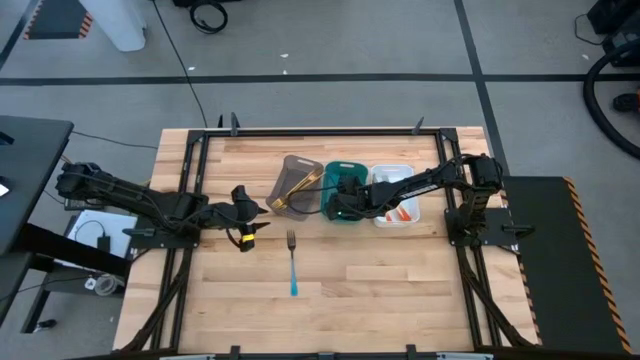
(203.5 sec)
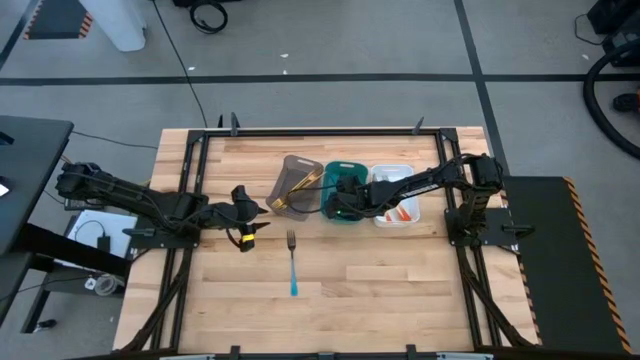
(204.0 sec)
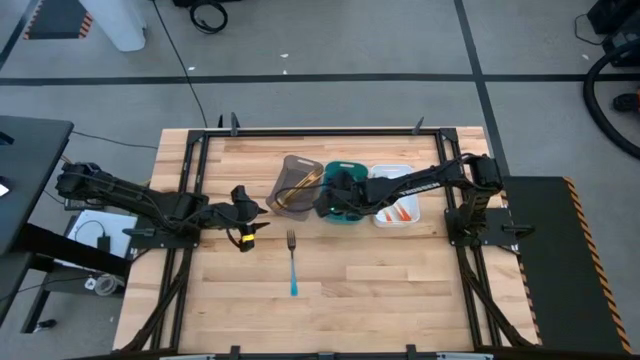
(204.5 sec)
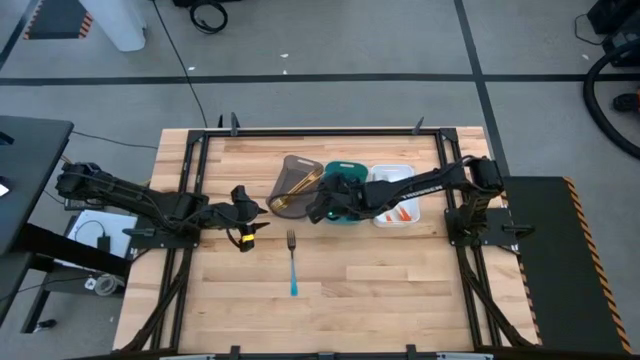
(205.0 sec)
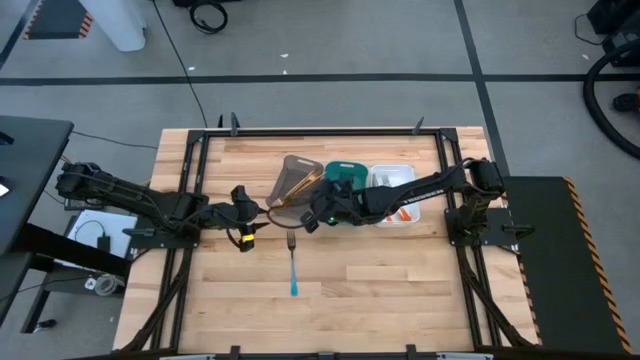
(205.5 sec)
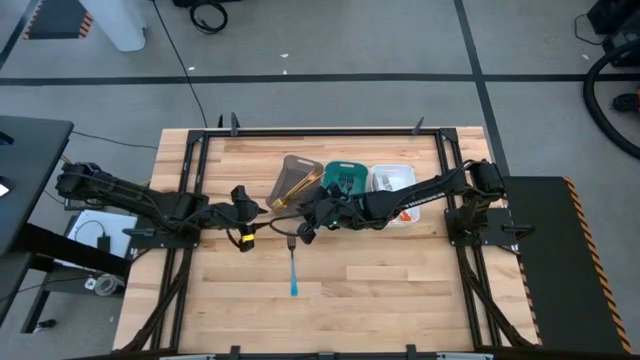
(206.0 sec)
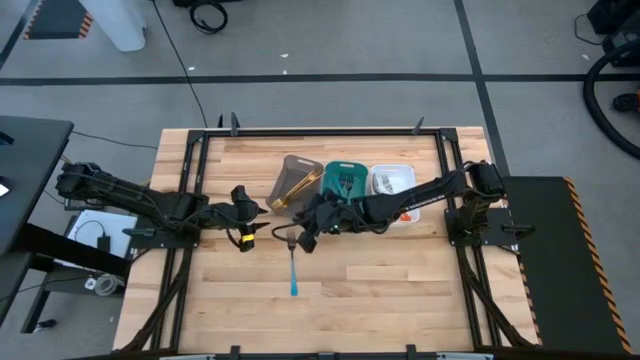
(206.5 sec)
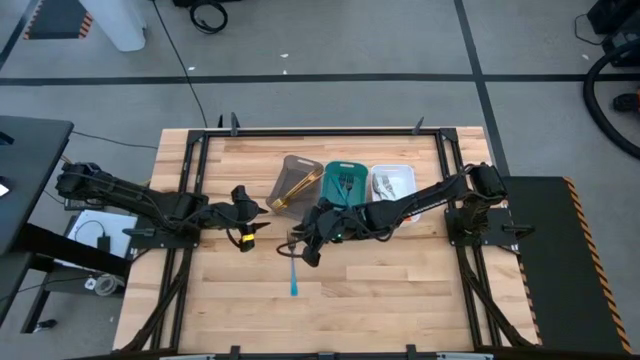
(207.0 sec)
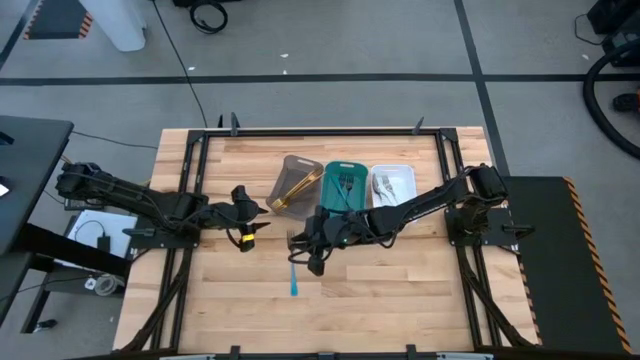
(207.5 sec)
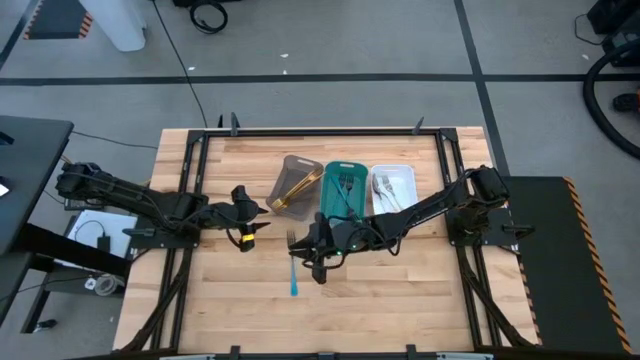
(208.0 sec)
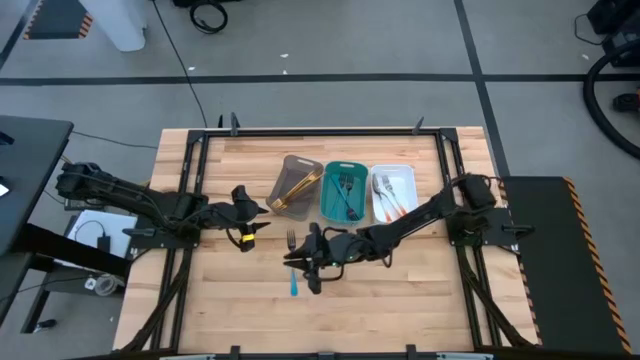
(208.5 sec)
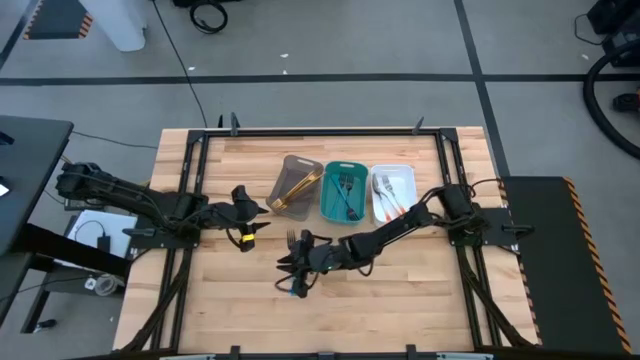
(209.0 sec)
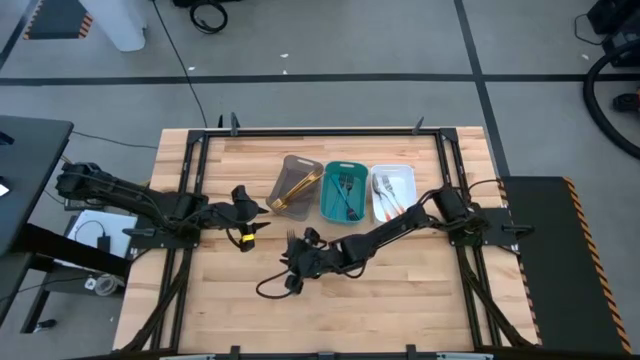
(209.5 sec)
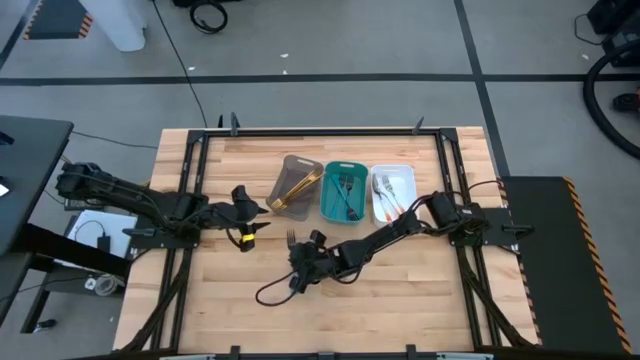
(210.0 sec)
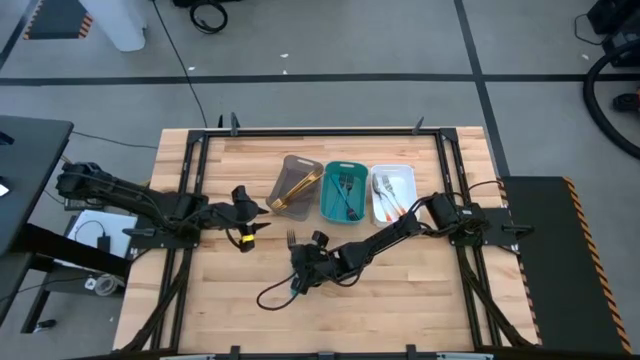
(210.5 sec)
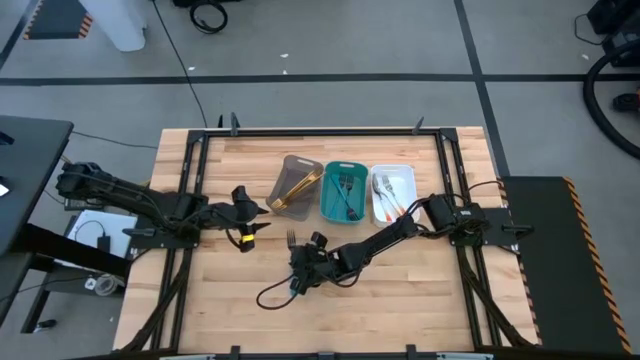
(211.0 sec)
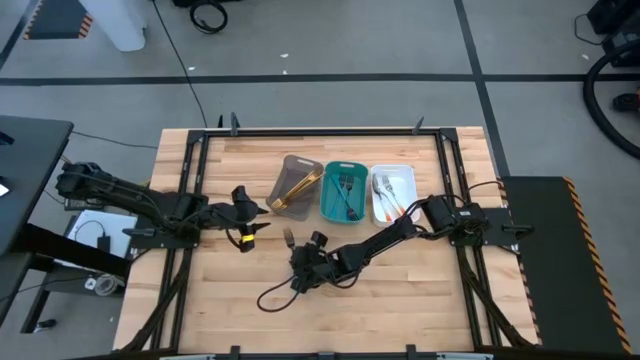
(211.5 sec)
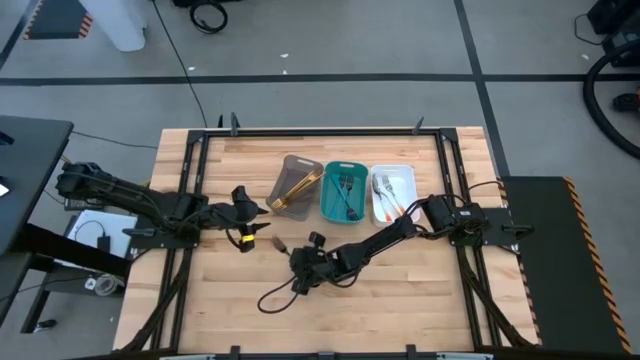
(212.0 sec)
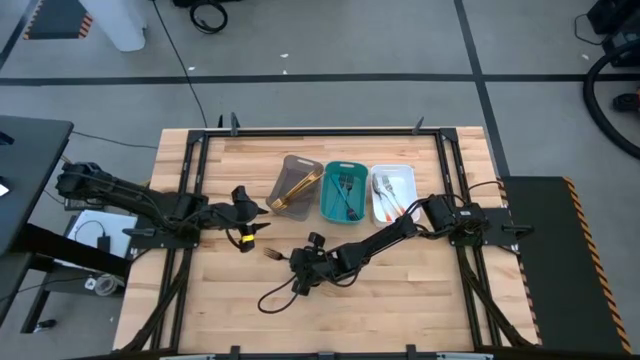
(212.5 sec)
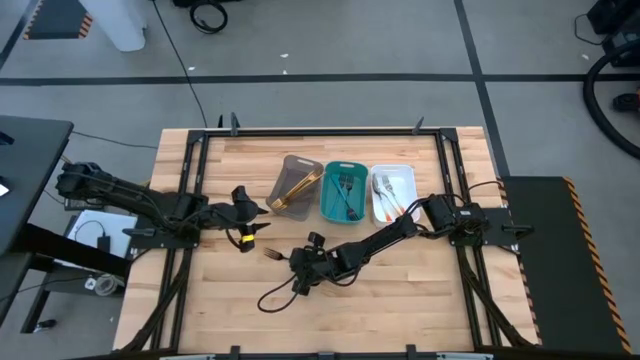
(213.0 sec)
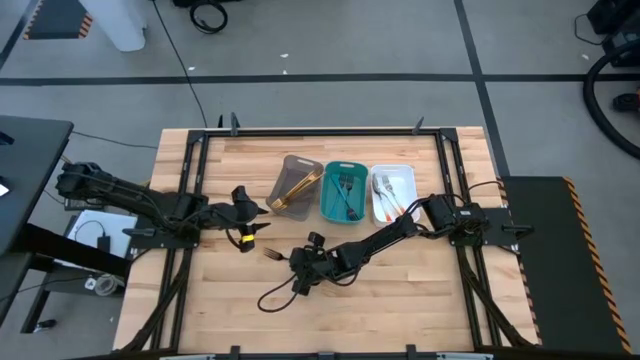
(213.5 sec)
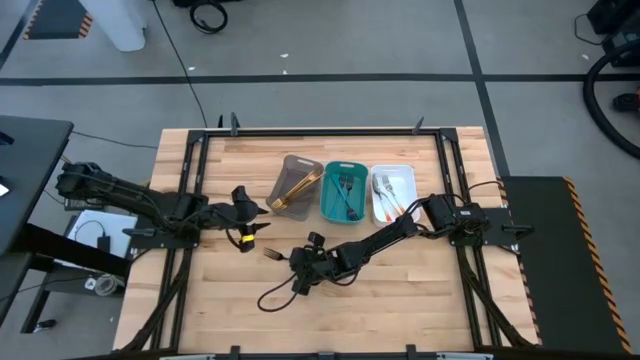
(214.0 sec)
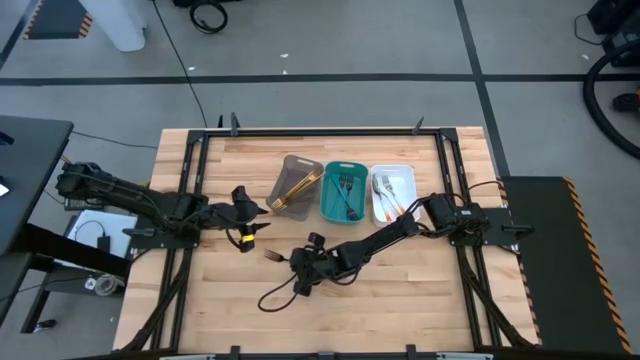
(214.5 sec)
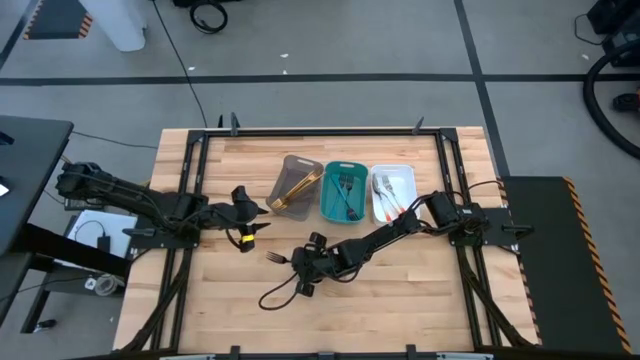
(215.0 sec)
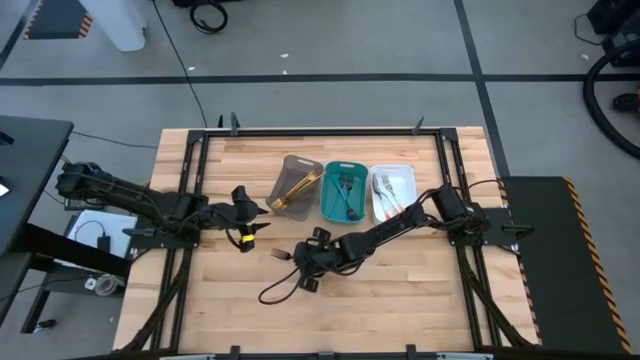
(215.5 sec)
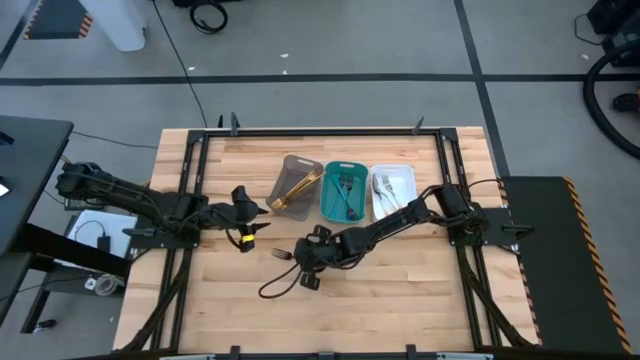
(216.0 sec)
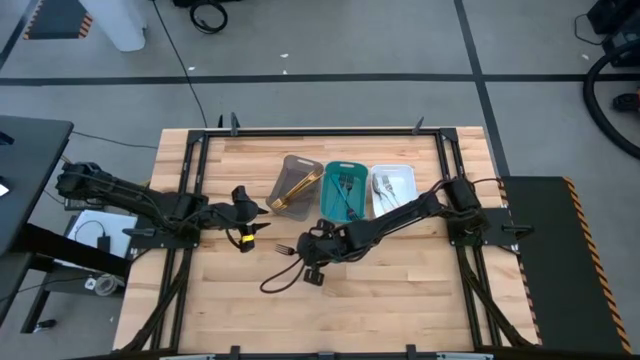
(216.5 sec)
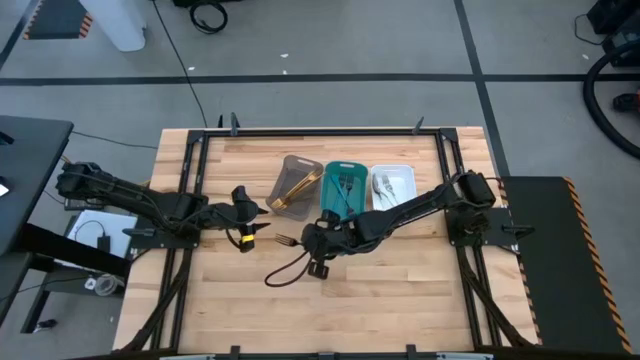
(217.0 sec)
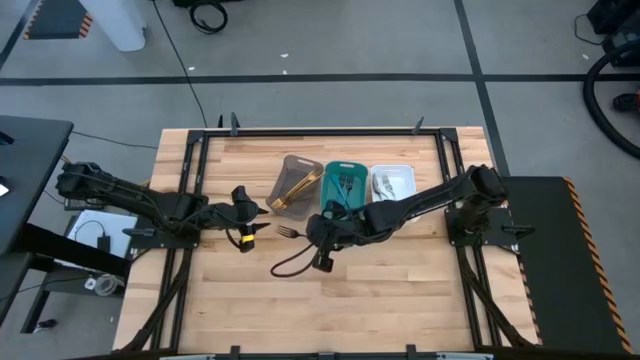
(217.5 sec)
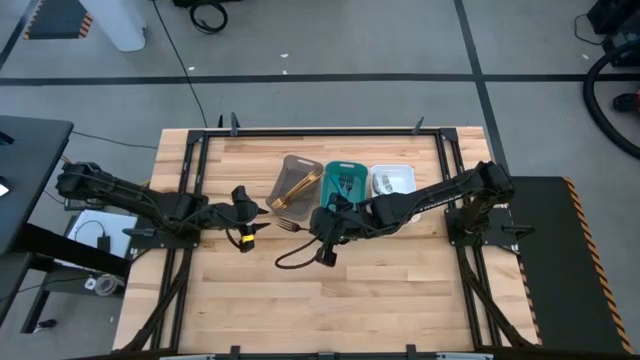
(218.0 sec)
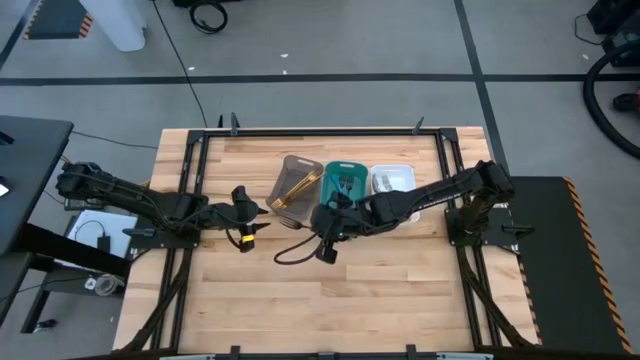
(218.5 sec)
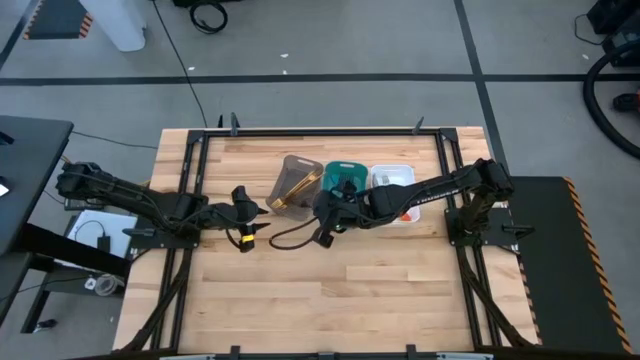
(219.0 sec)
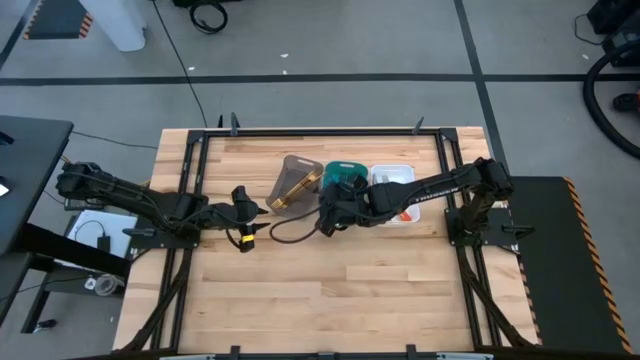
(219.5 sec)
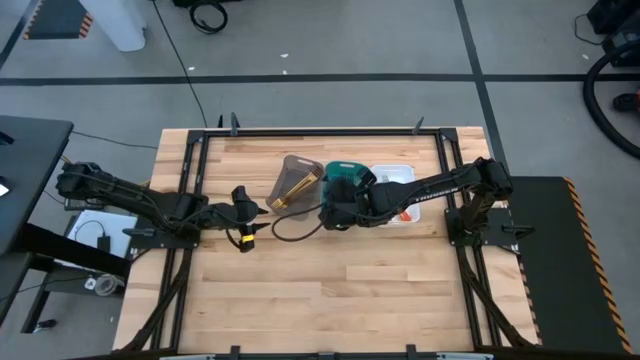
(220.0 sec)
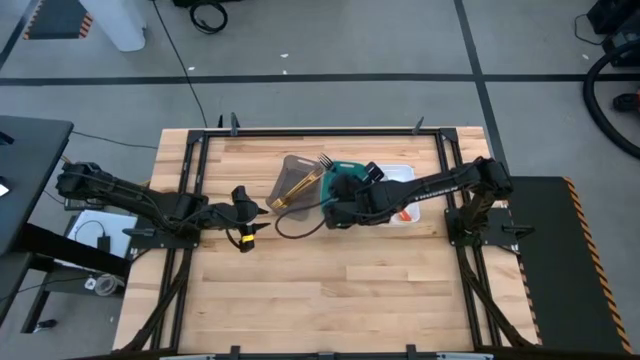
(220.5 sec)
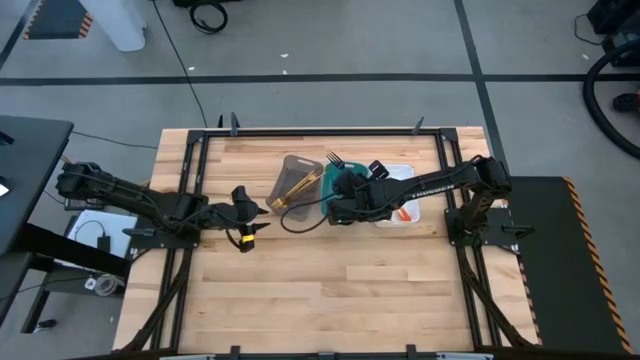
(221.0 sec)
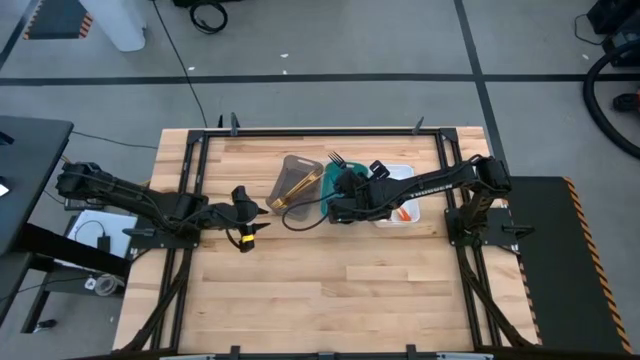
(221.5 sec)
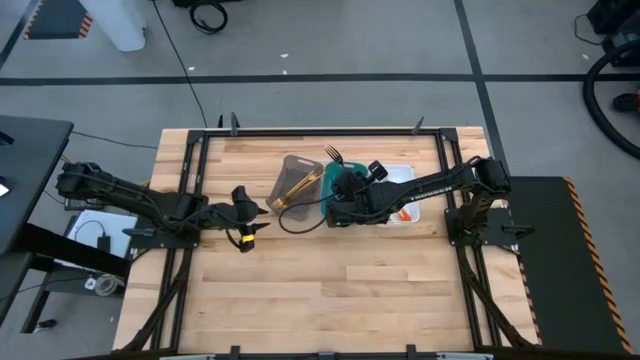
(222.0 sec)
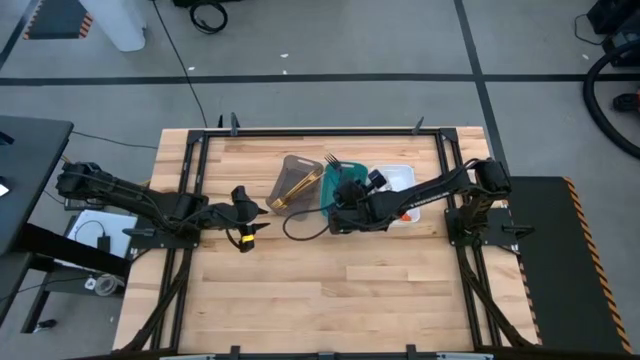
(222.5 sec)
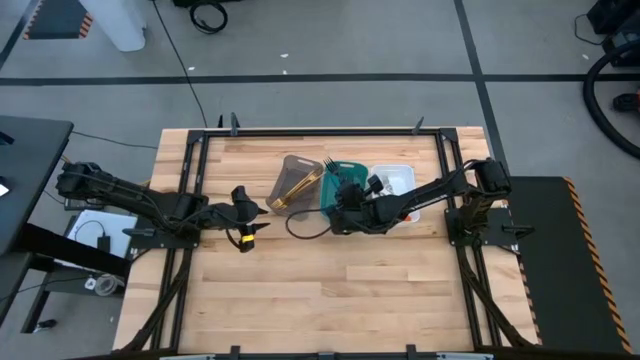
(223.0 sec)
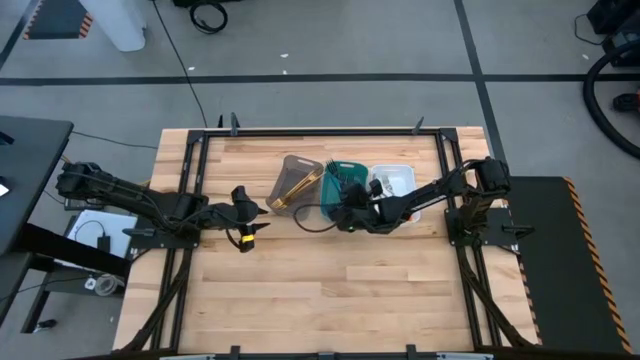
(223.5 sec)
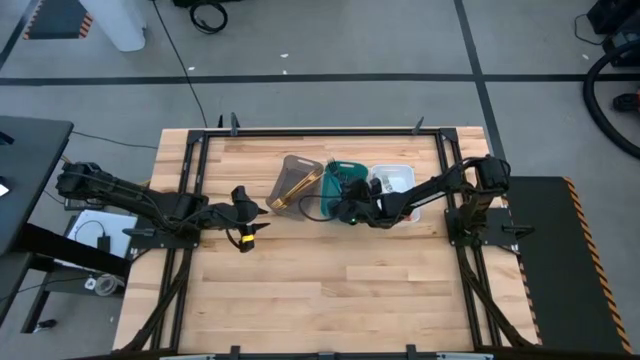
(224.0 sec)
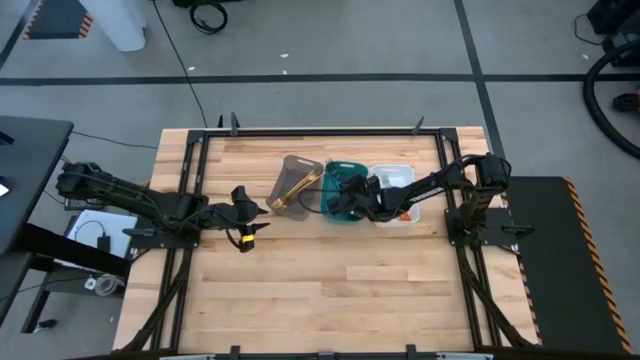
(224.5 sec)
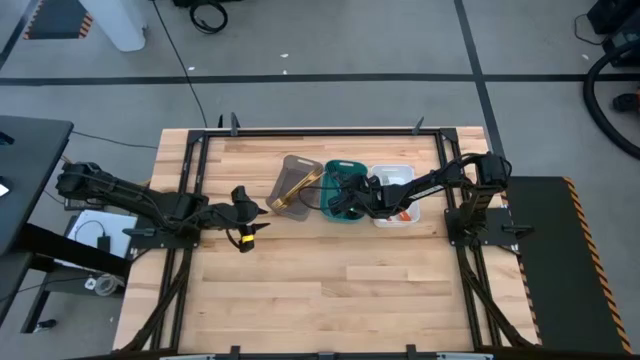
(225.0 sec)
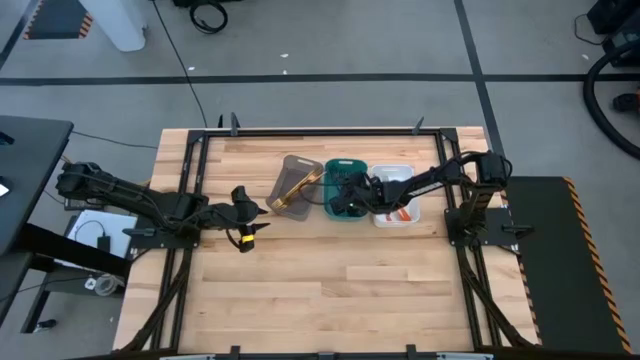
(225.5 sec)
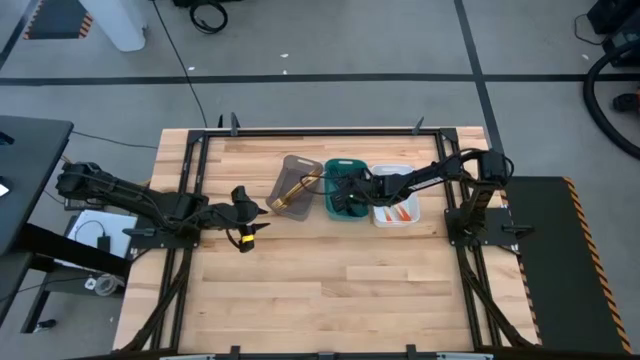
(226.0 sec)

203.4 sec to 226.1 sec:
Task: Sort silverware by color (type)
Put the blue fork into the green bin
